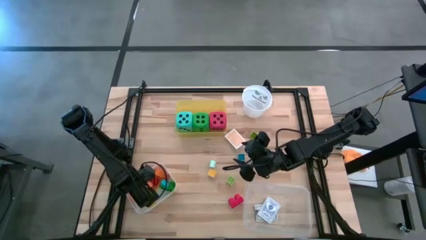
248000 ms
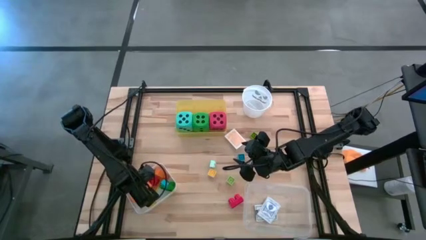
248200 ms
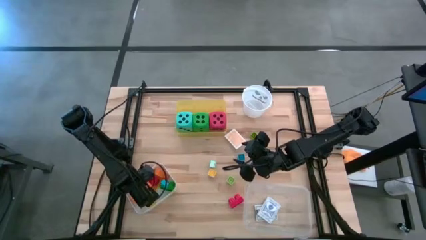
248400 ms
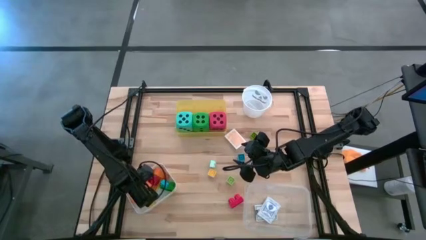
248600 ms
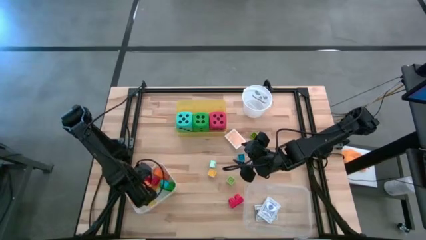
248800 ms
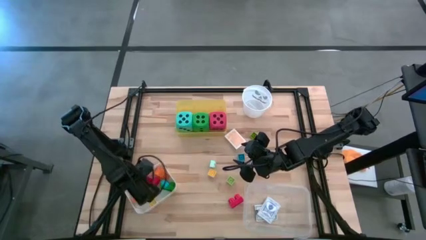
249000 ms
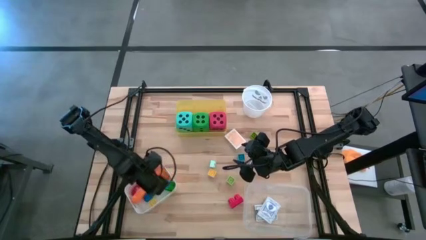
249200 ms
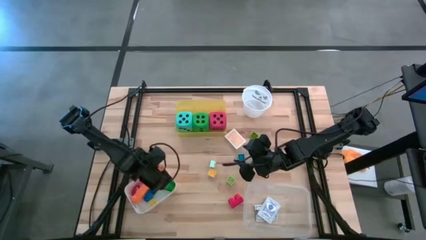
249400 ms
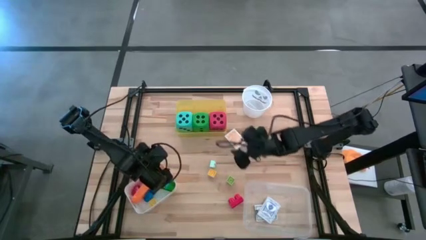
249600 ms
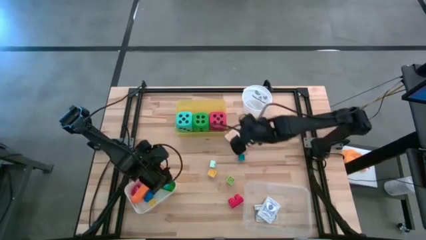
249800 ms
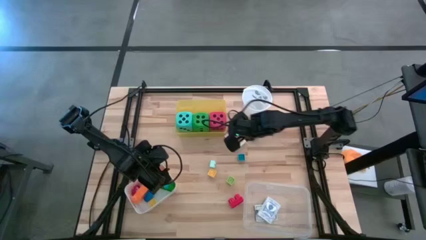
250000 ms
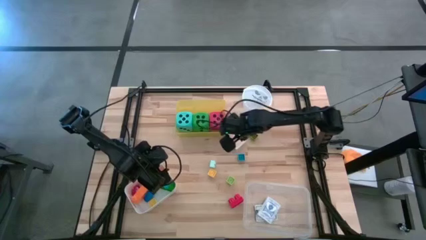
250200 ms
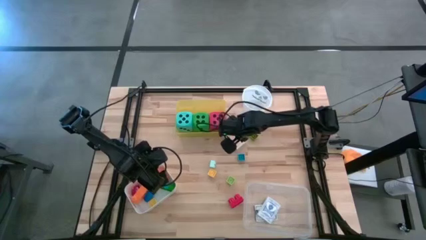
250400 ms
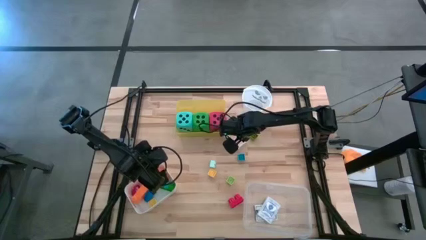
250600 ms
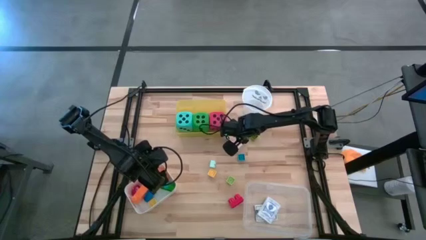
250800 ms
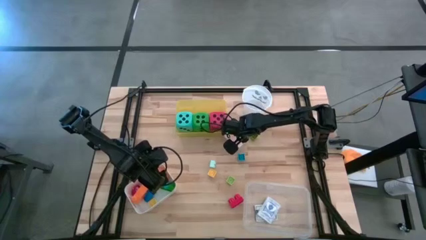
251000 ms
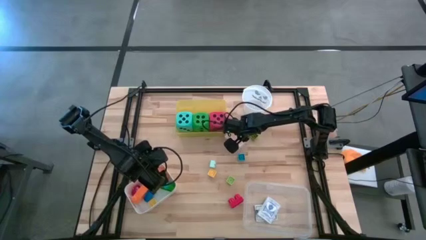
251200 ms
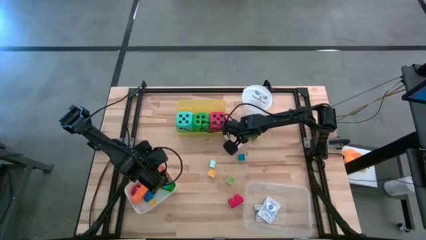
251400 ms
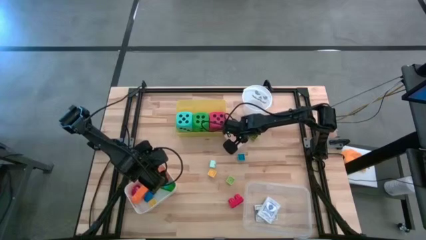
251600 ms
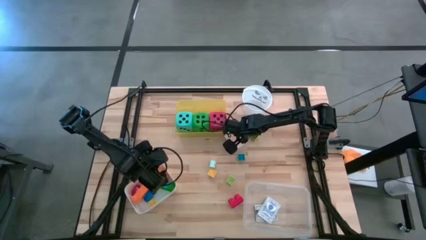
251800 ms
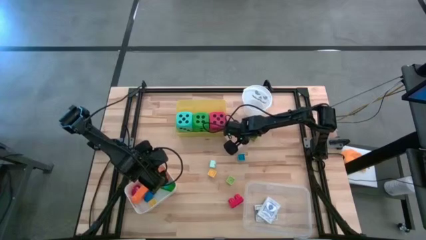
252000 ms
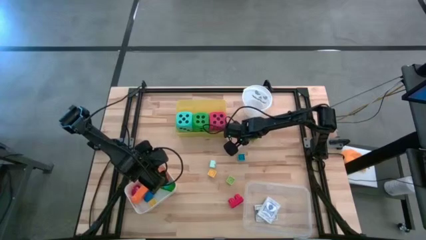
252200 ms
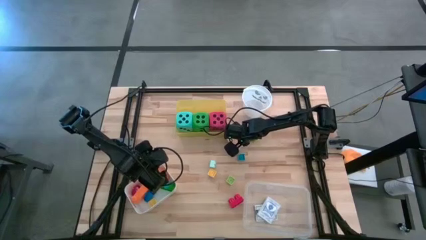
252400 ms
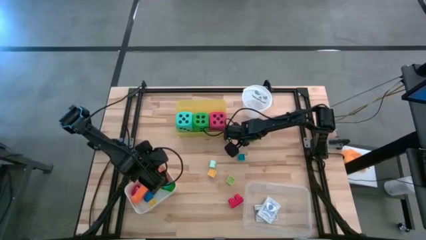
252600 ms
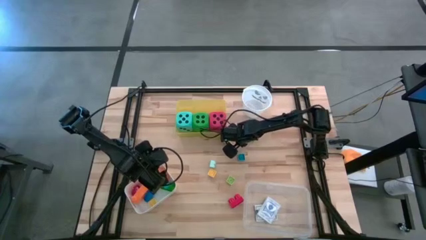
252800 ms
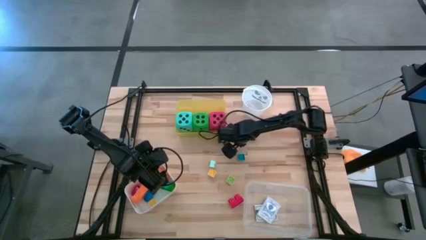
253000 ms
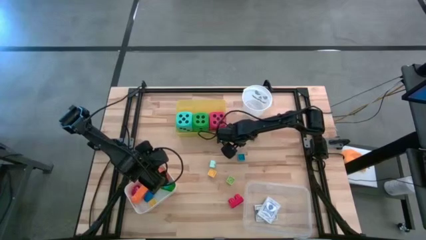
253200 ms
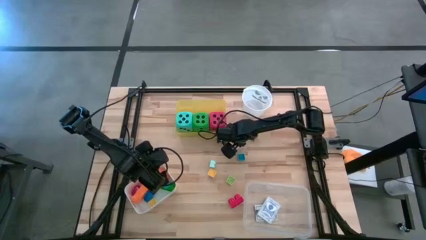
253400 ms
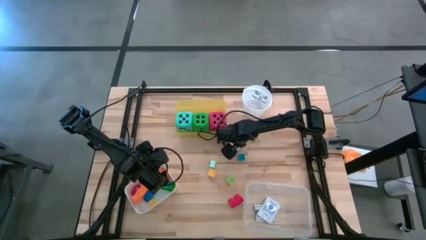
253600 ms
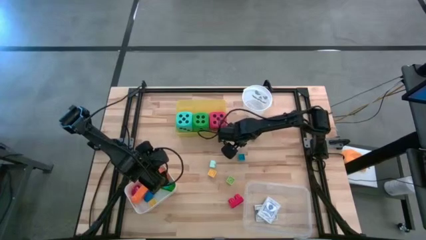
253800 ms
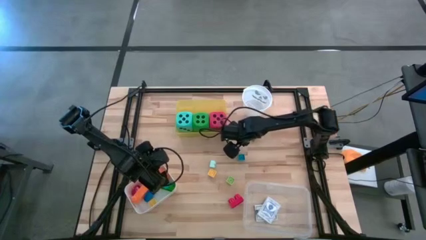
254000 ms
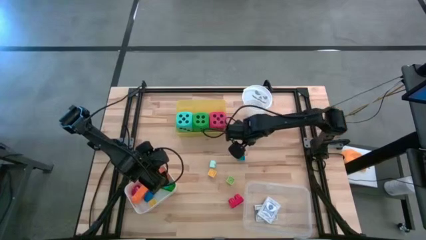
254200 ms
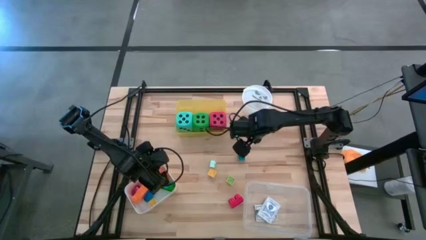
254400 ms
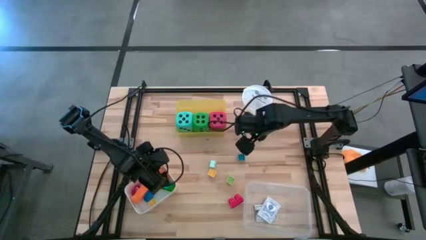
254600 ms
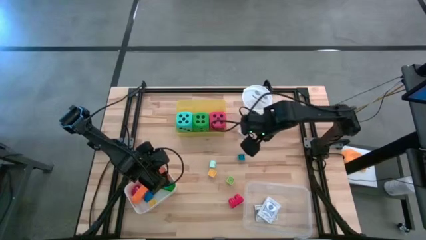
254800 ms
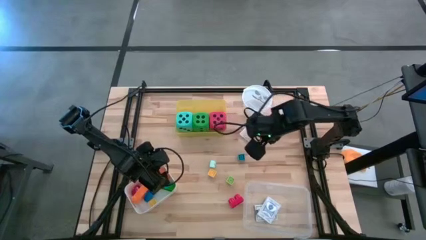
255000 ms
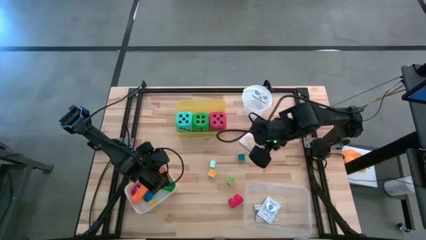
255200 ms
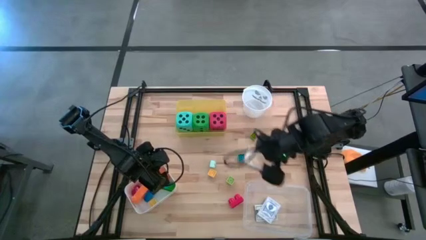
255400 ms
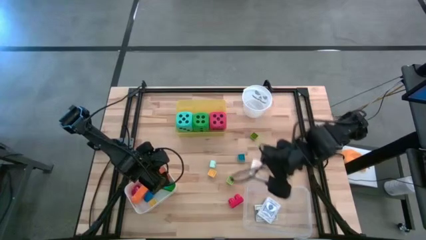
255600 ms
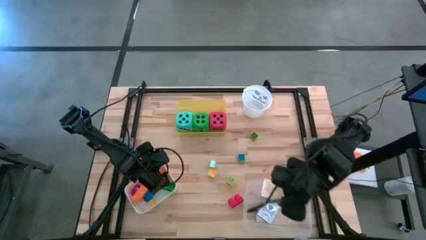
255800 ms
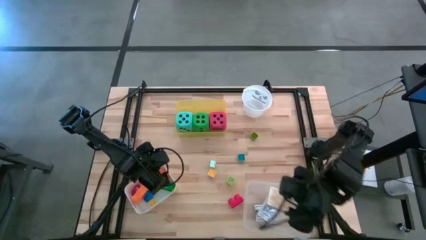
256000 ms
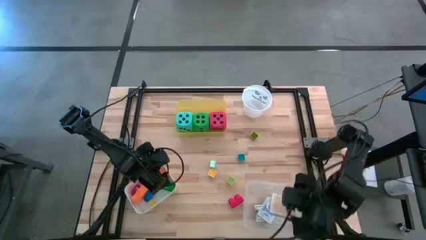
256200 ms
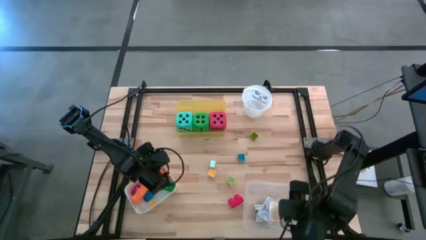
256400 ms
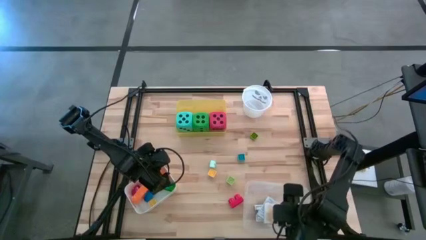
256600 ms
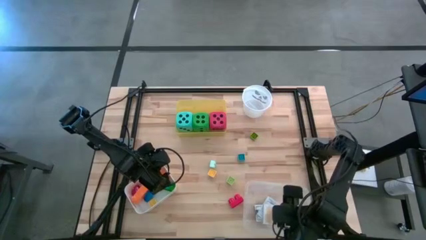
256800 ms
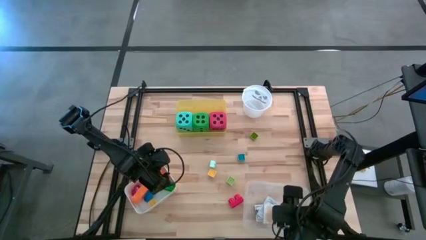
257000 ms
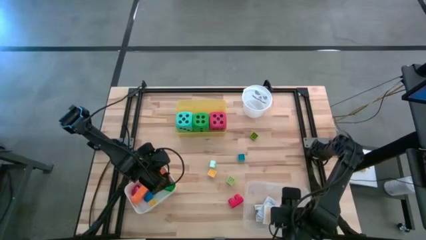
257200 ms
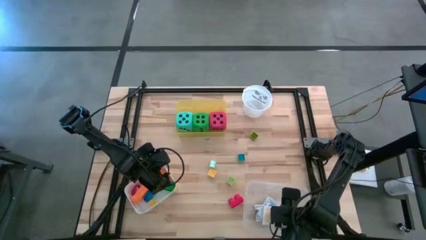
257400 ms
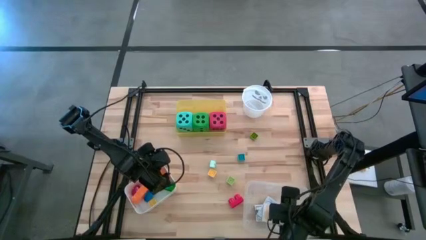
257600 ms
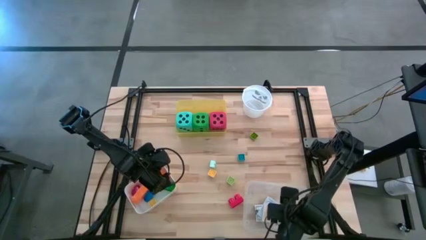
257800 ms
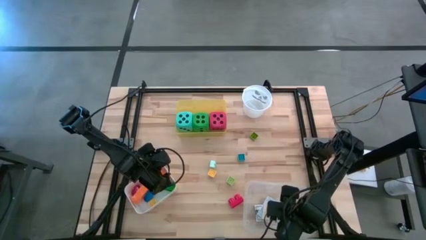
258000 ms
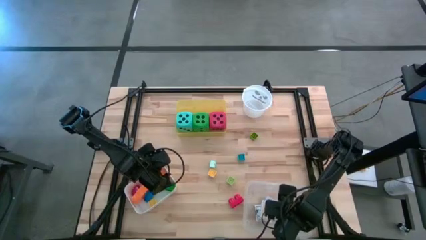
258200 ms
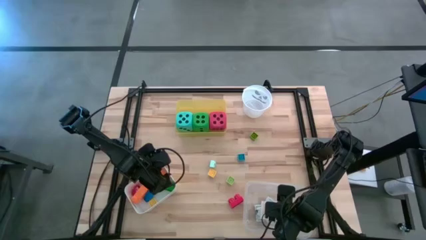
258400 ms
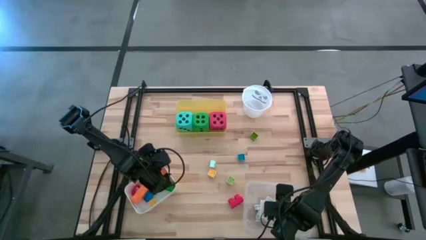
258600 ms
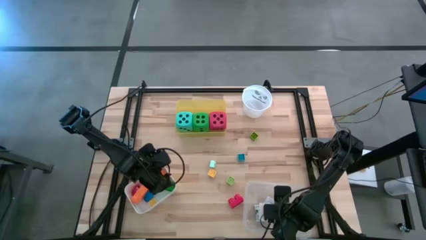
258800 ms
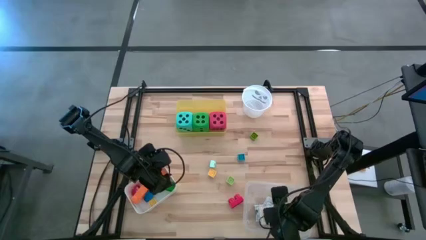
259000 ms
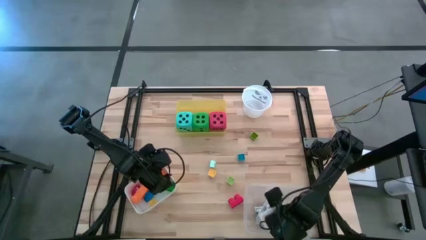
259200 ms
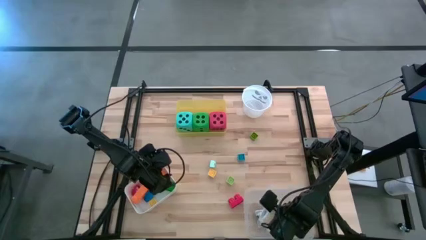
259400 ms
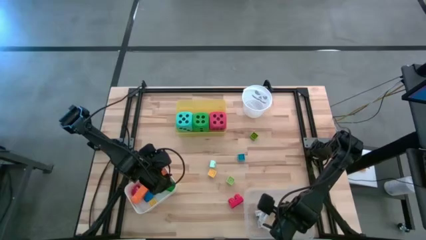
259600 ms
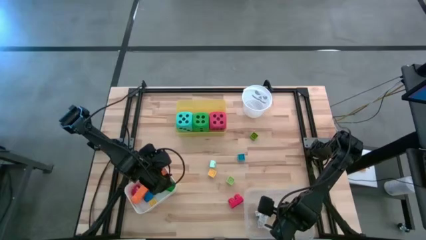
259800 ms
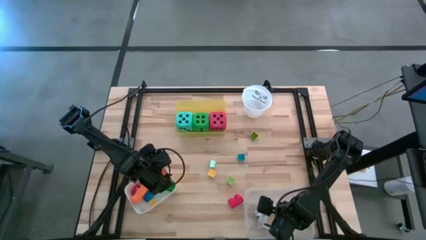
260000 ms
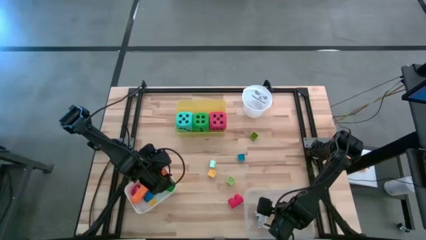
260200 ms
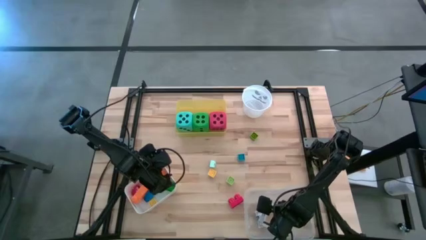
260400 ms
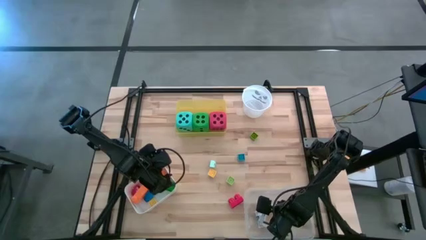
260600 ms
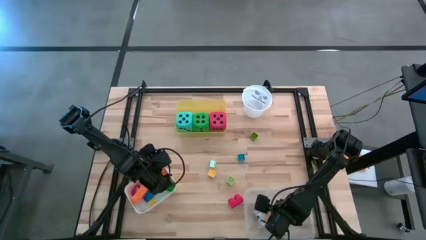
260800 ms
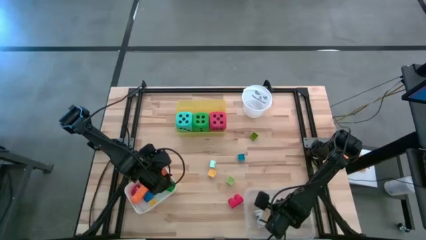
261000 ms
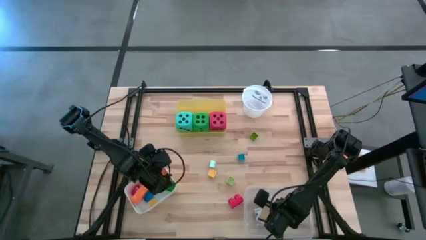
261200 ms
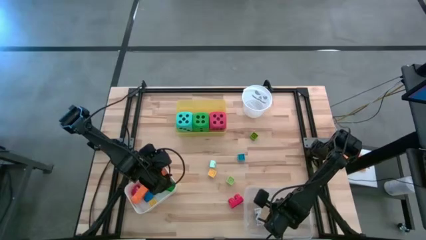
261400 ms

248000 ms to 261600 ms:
Task: Pick & Place Toys
Put the yellow deck of cards into the transparent bin

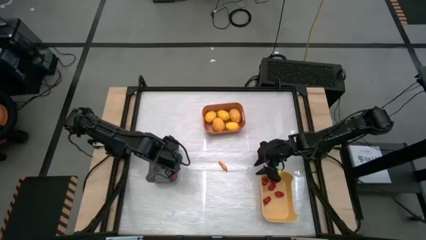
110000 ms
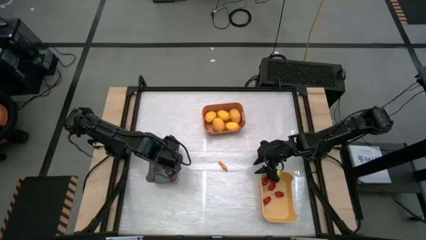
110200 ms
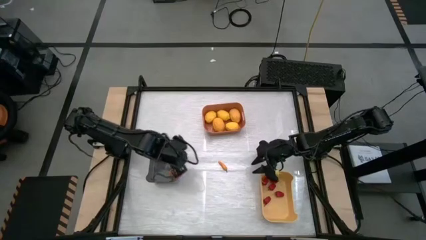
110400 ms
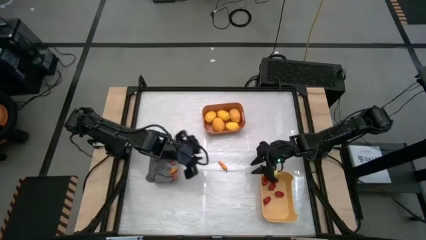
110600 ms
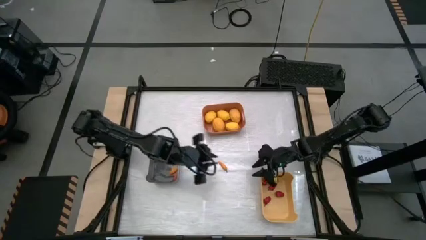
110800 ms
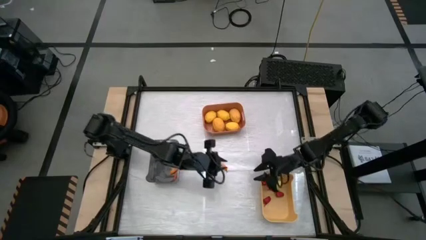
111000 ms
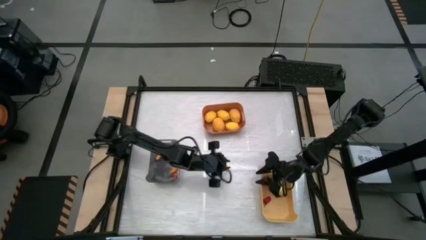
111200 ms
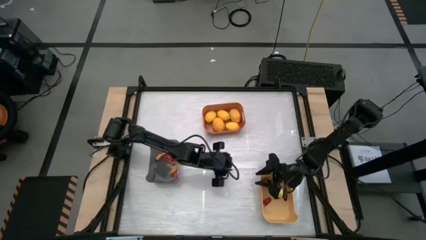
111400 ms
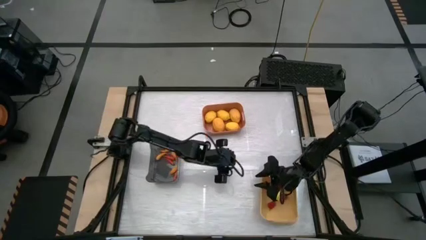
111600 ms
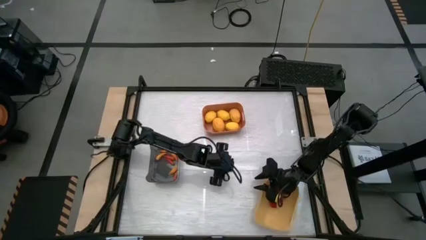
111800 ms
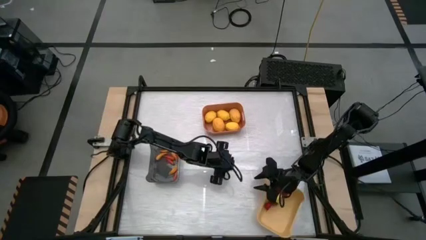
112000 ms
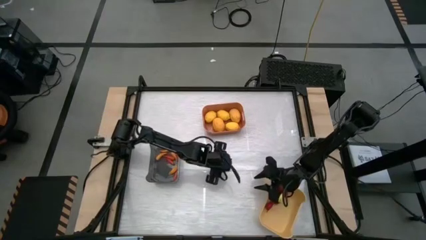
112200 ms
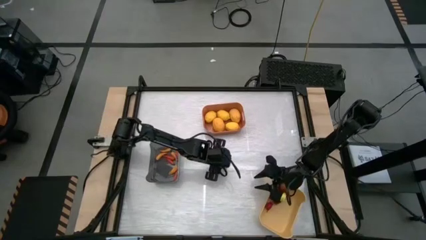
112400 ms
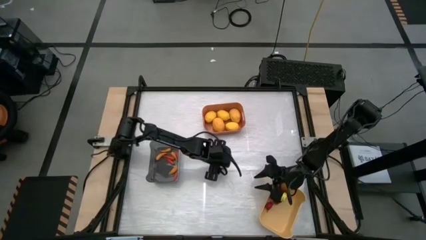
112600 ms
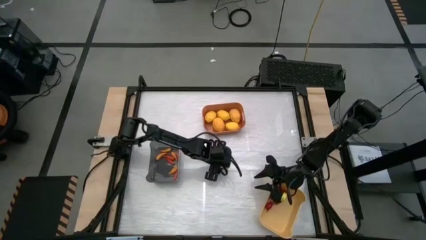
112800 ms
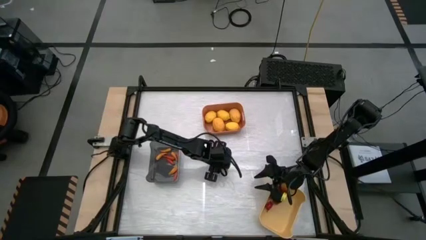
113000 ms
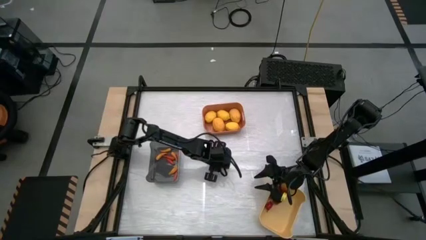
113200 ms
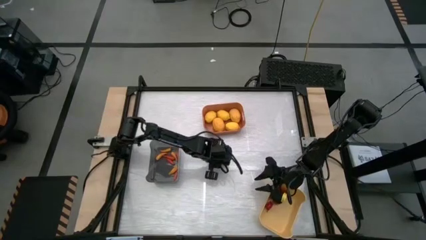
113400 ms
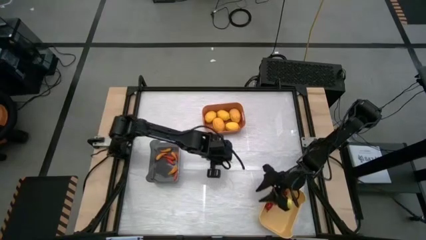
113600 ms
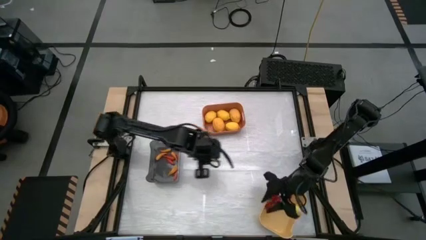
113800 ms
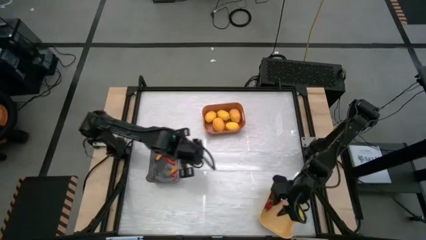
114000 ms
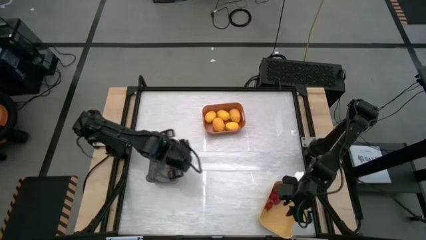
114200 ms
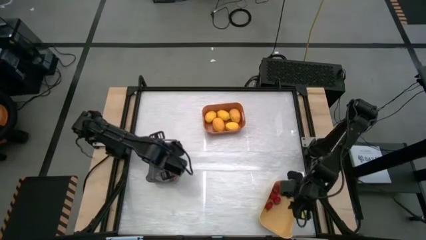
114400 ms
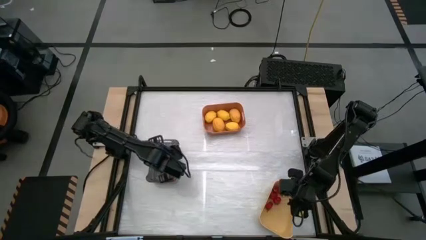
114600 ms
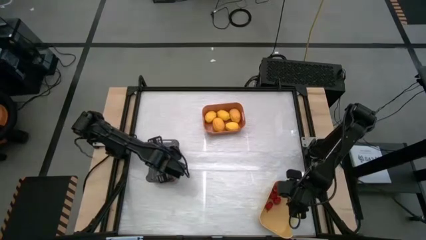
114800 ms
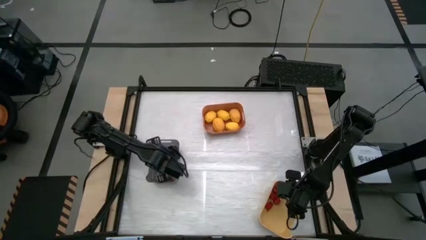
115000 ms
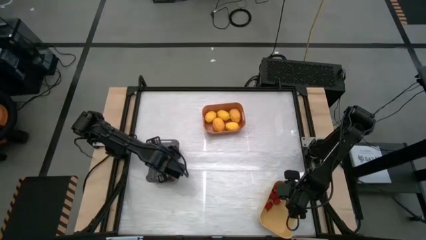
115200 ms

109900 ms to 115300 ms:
Task: Sort produce into baskets
Put the yellow chili pepper into the black bin
